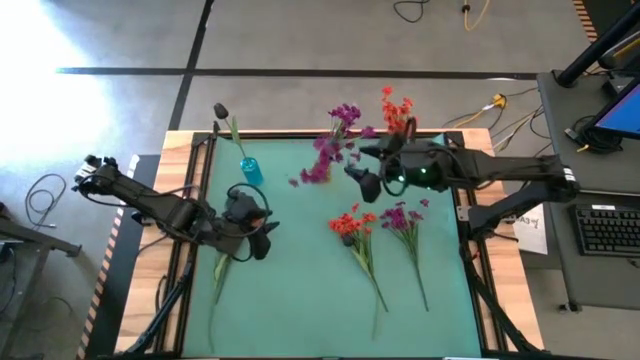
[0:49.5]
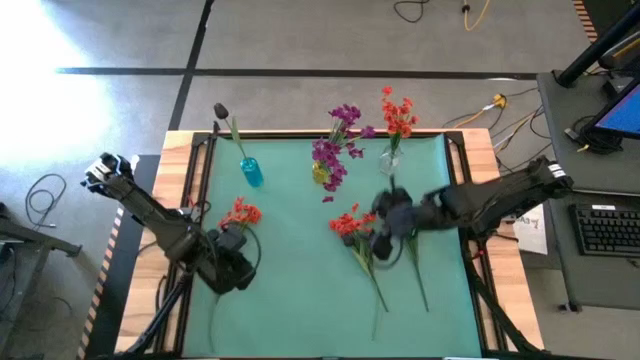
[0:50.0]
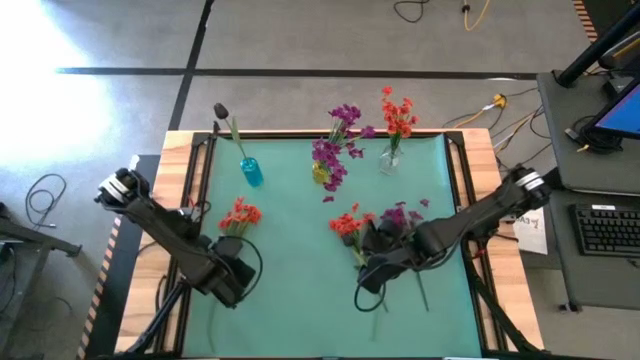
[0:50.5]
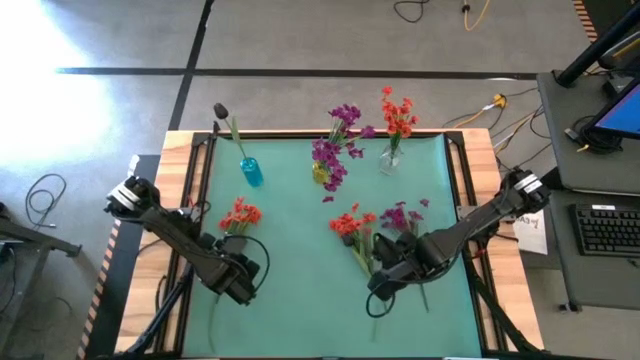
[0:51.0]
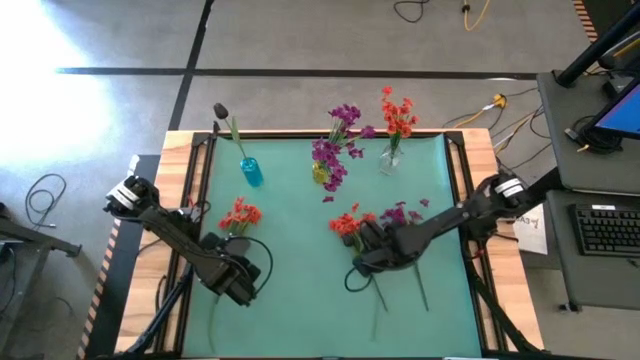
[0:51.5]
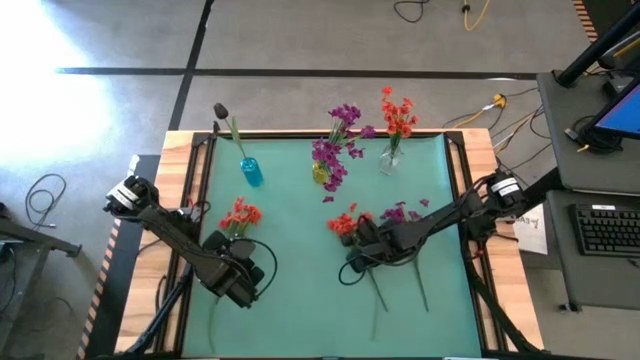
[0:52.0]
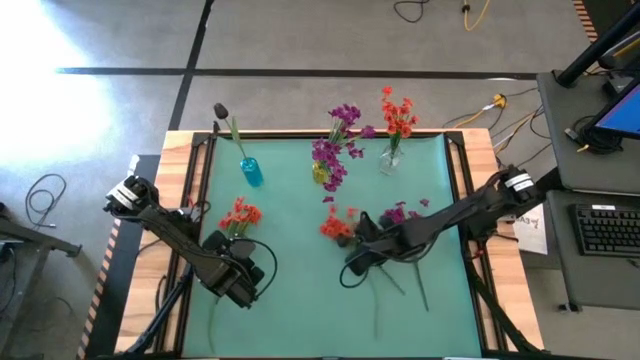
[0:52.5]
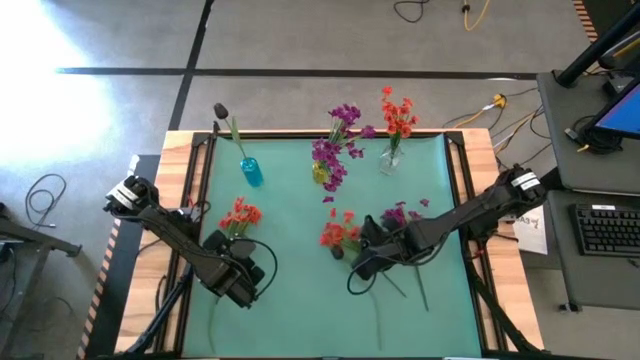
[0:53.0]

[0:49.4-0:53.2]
Task: Sort flowers into vase by color
Put the right orange flowers into the transparent vase

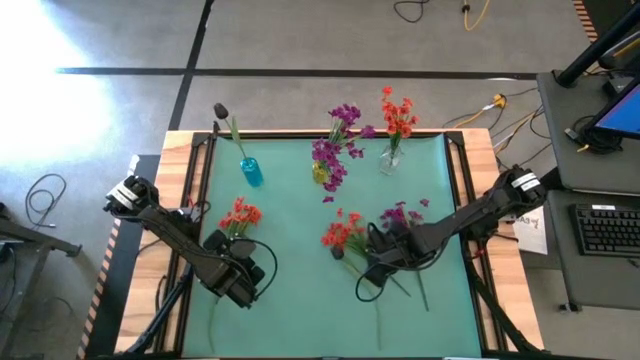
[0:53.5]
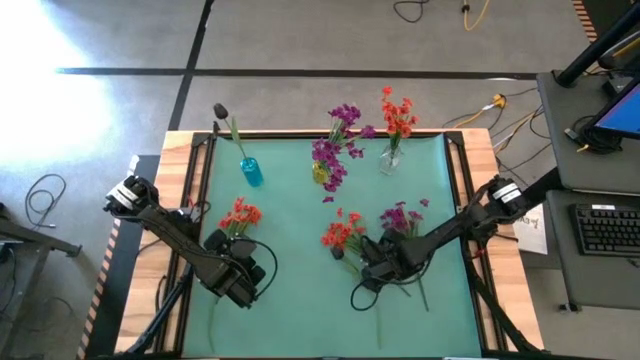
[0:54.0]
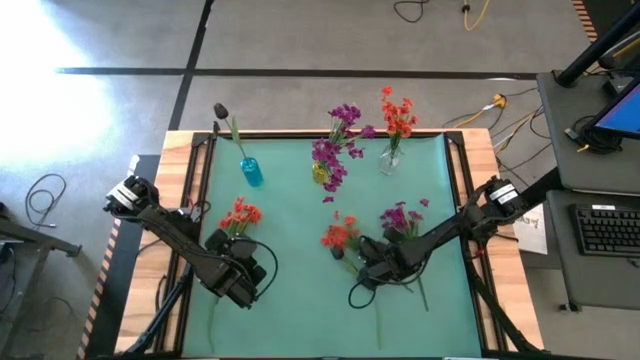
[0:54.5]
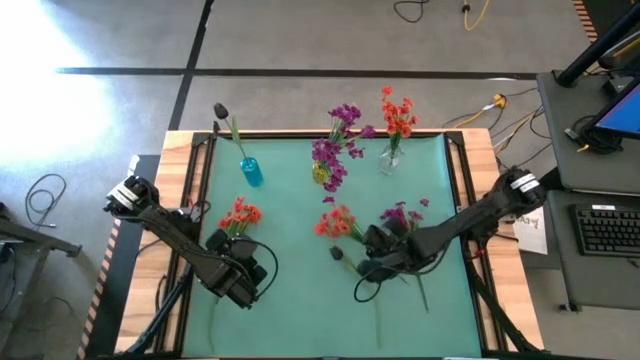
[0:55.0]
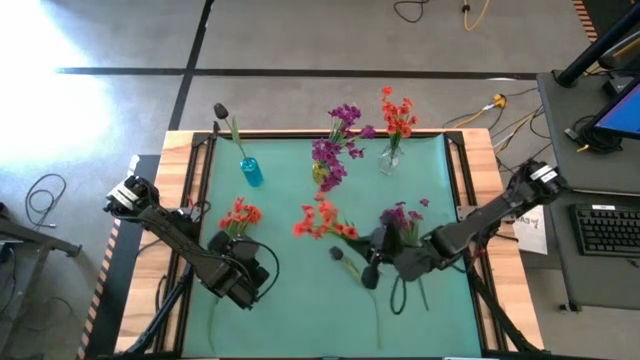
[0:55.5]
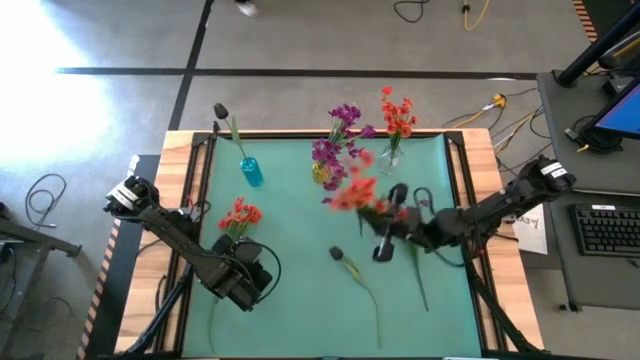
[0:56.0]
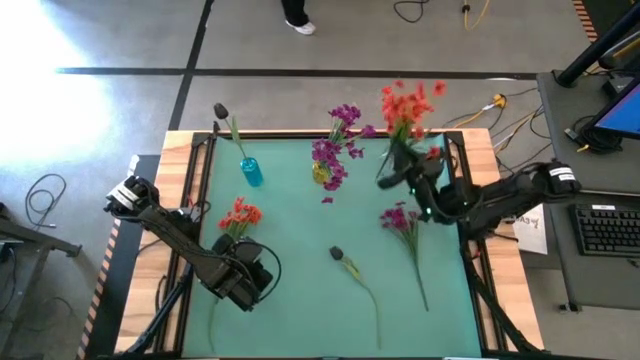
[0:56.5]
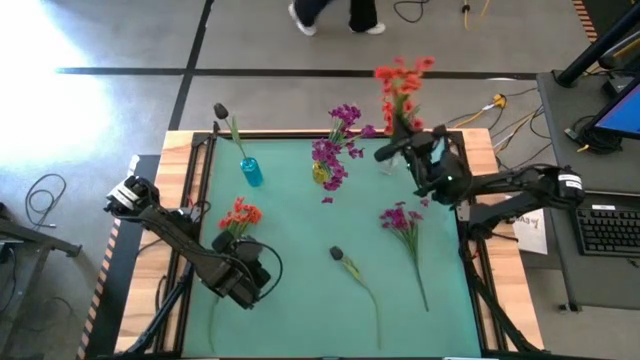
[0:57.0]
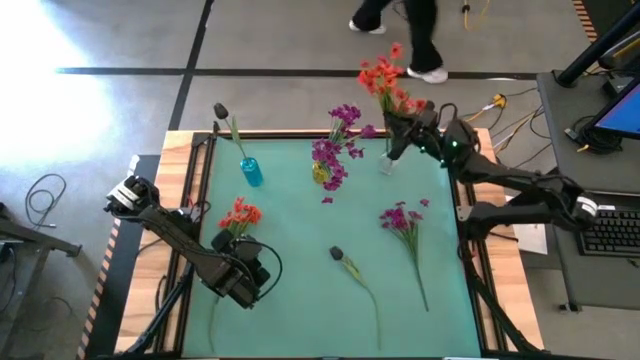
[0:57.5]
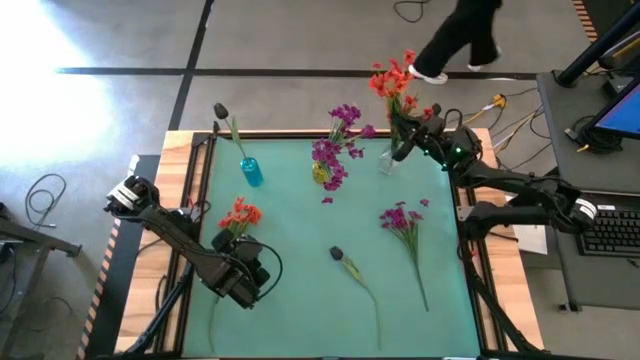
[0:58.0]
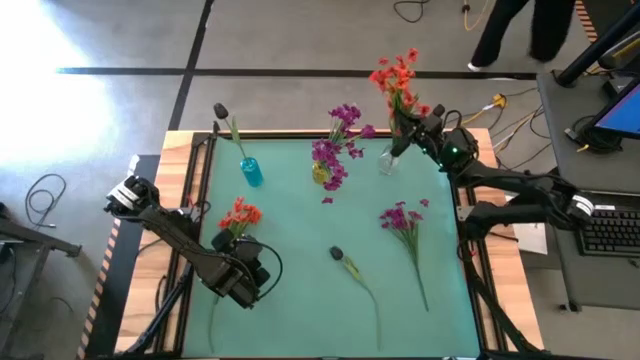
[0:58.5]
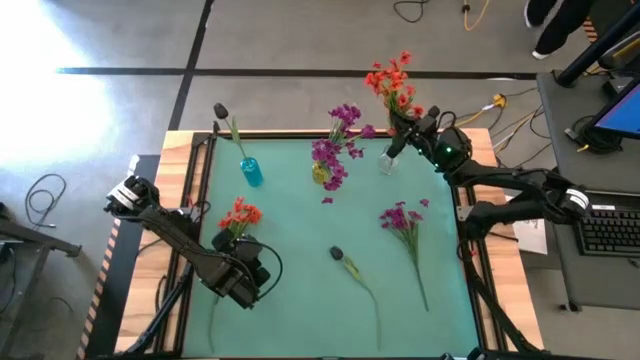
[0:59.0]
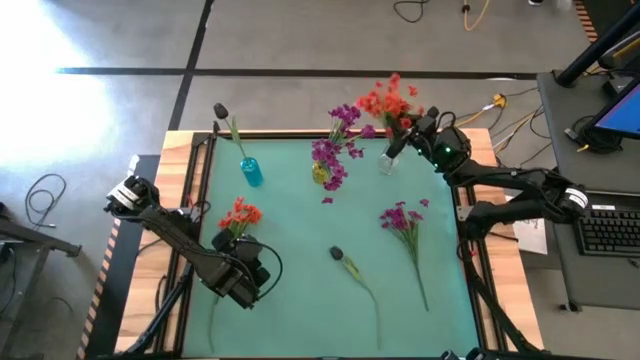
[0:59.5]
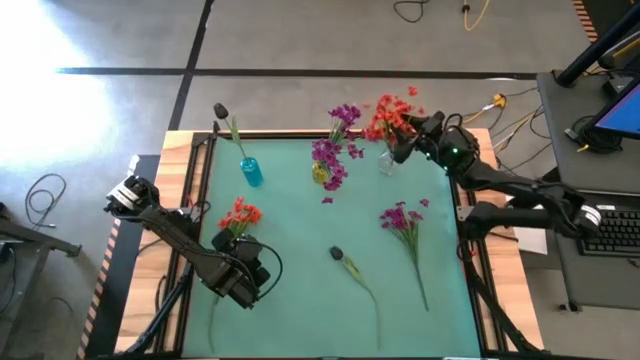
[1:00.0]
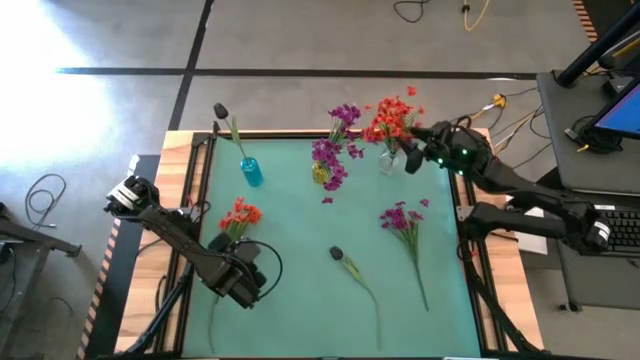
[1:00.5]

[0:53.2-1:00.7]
Put the right orange flowers into the transparent vase

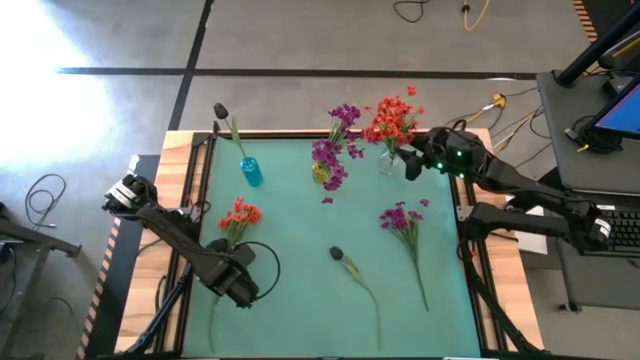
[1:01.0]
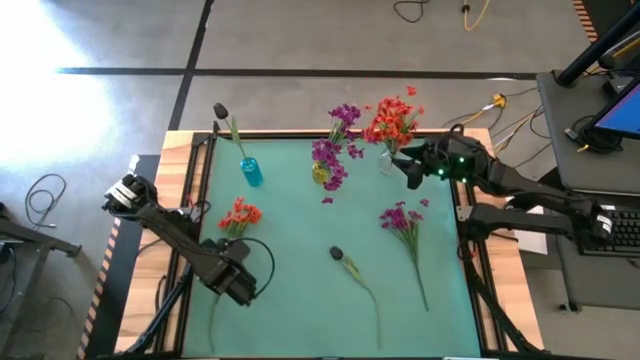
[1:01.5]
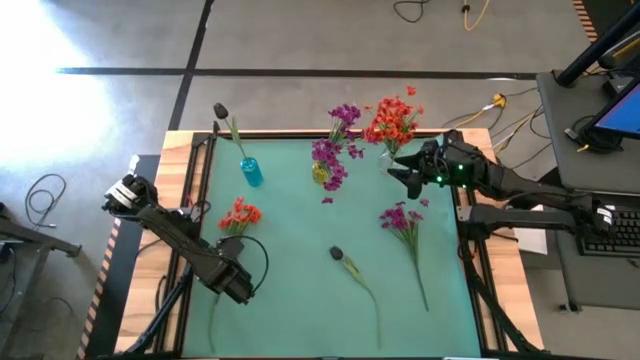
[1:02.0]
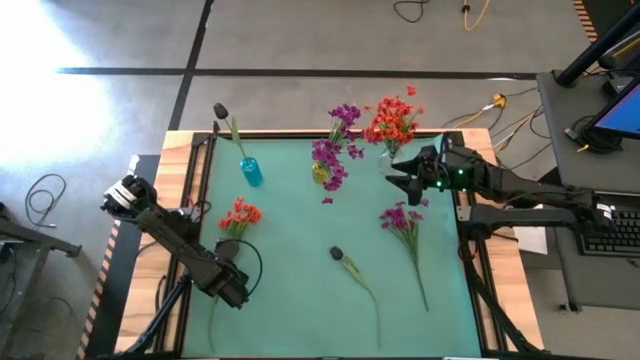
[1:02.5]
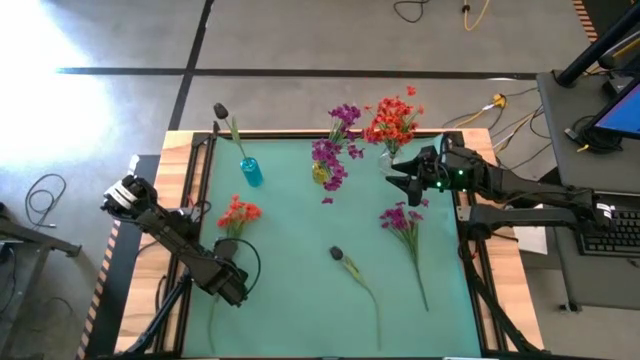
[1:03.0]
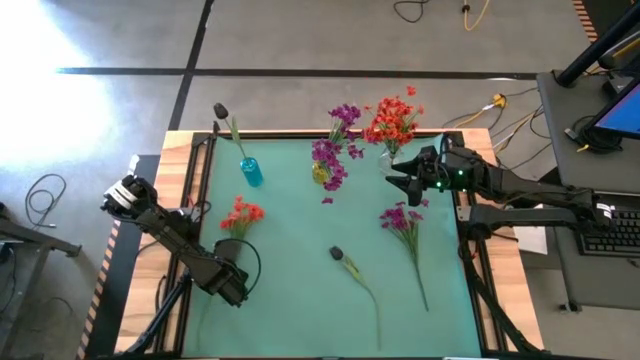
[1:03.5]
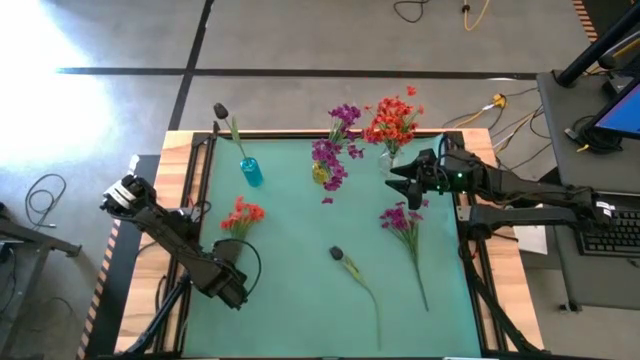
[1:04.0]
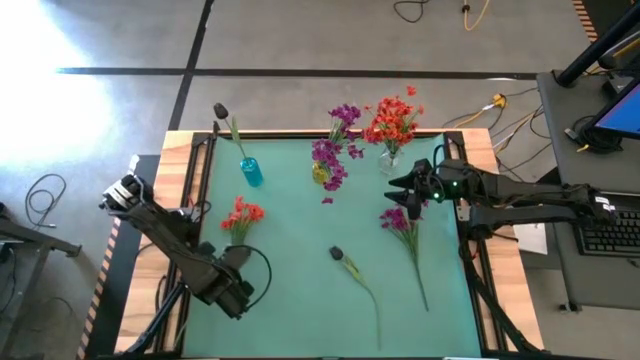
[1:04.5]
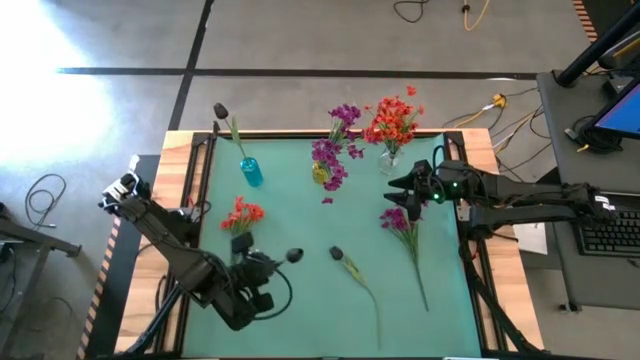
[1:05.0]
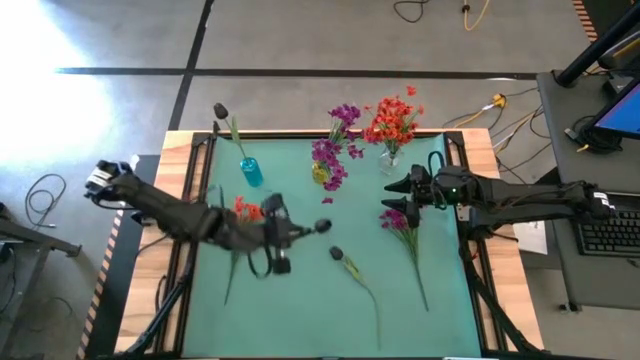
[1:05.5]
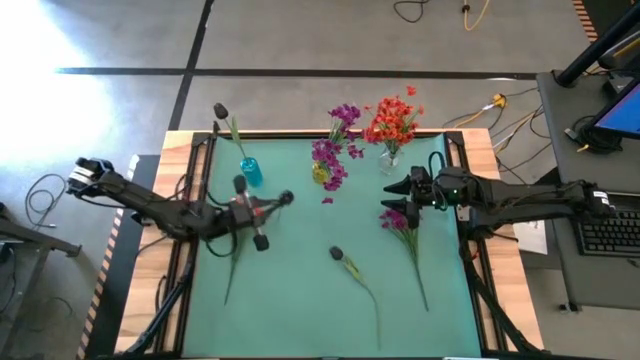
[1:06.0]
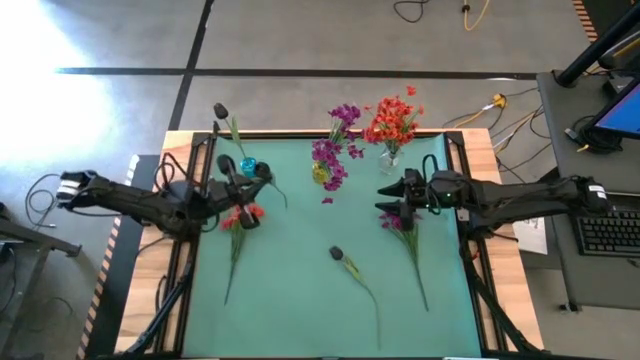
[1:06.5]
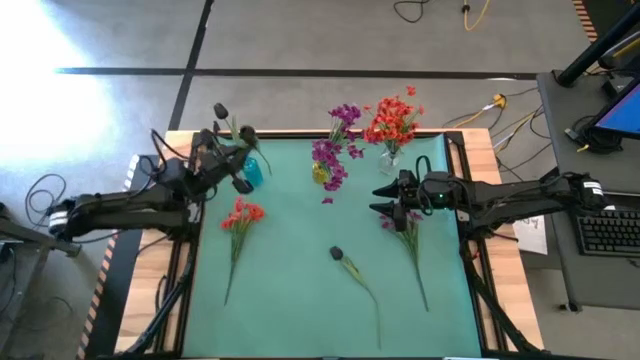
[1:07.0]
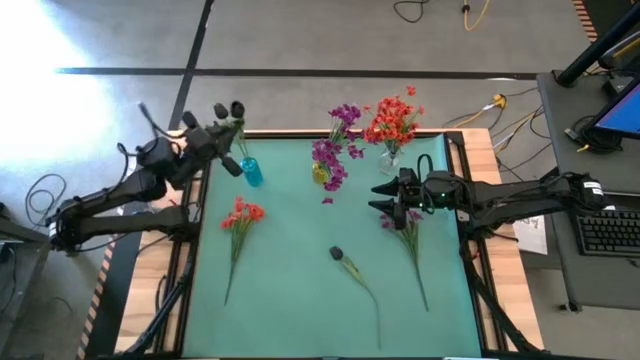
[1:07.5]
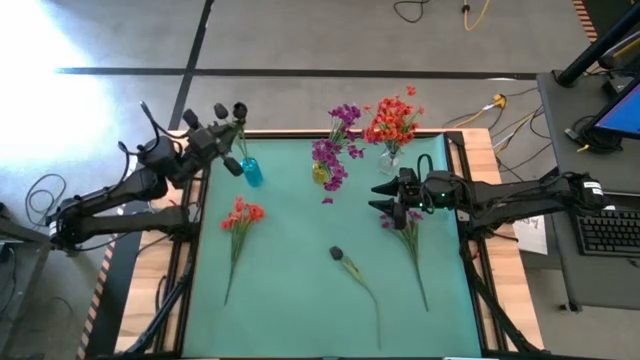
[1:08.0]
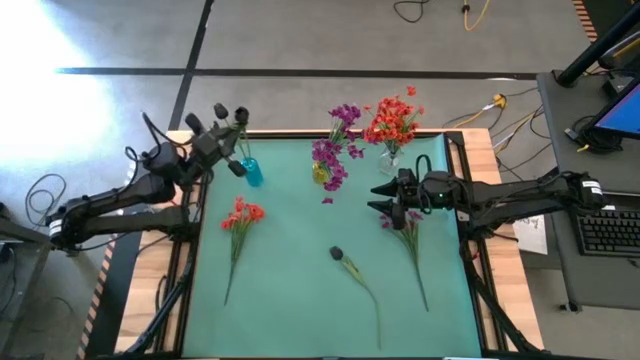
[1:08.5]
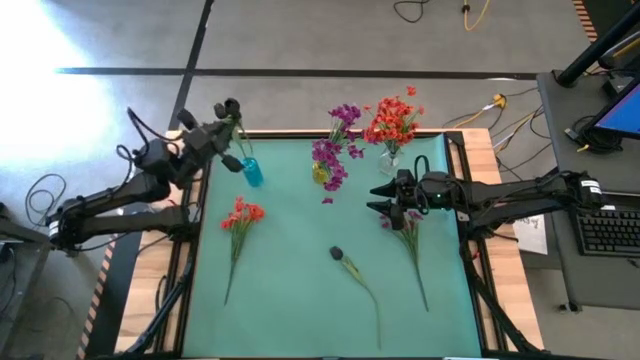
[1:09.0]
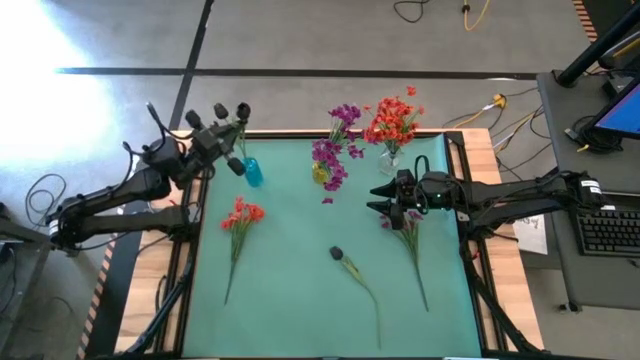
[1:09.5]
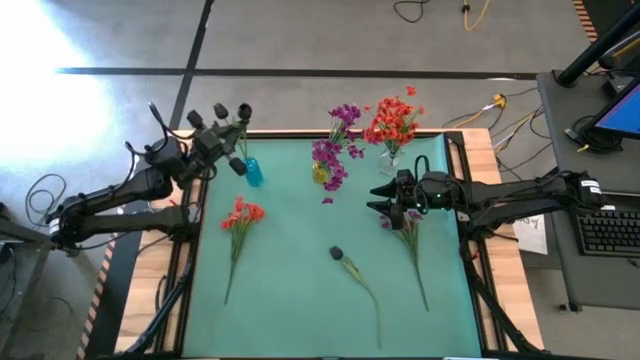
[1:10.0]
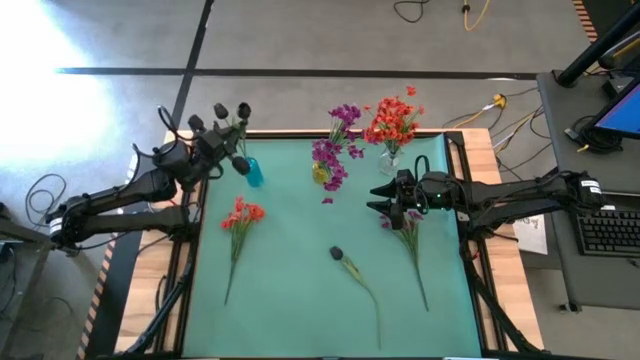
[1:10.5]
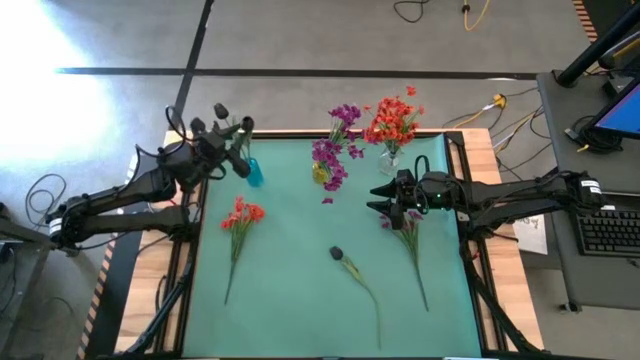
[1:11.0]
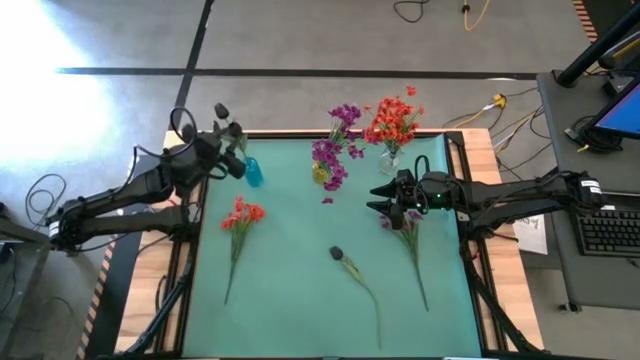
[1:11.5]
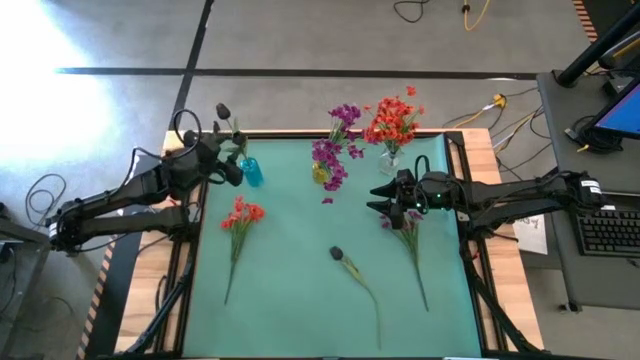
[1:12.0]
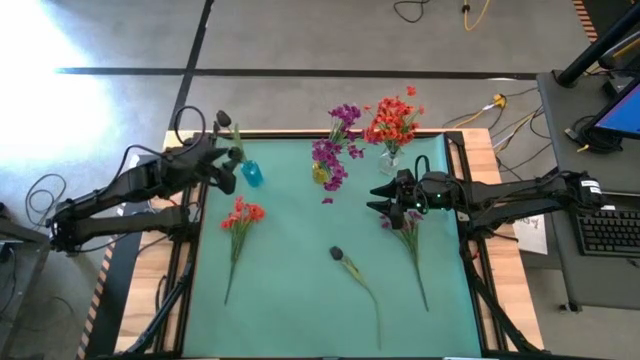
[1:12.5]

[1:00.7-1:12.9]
Put the left black flower into the blue vase
